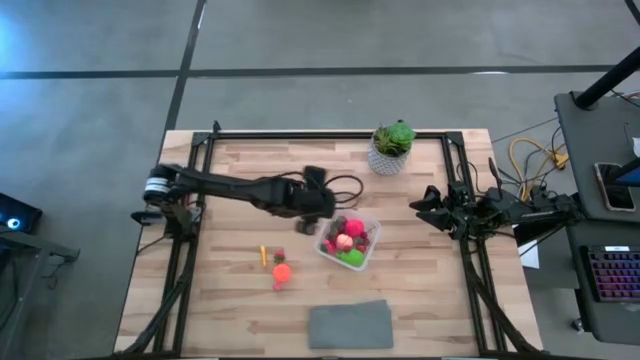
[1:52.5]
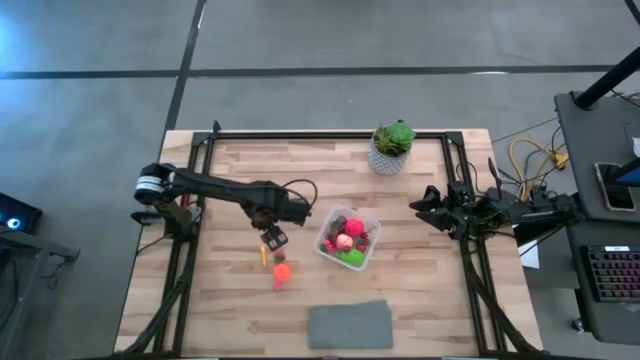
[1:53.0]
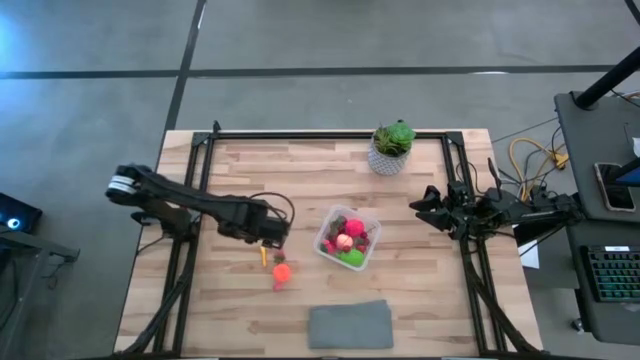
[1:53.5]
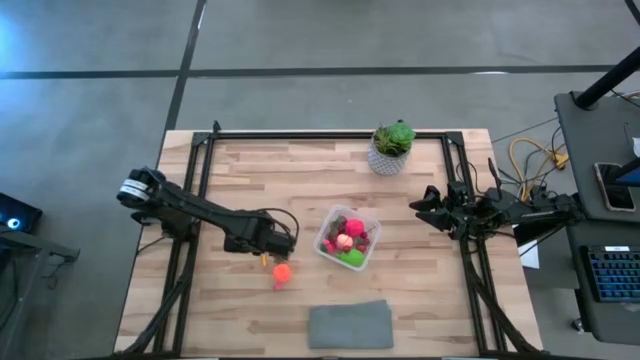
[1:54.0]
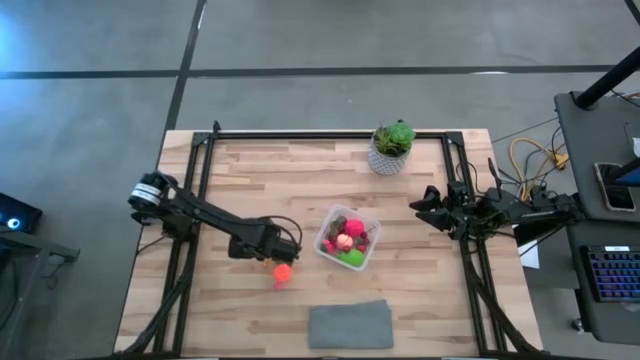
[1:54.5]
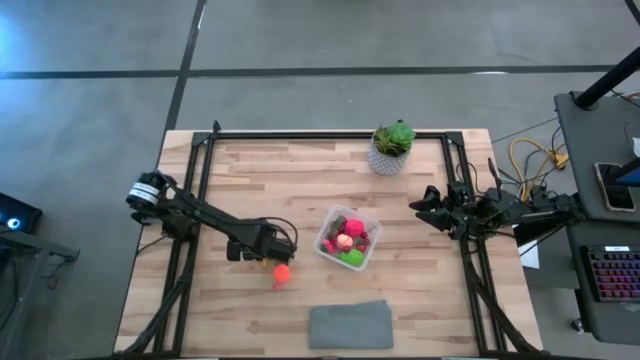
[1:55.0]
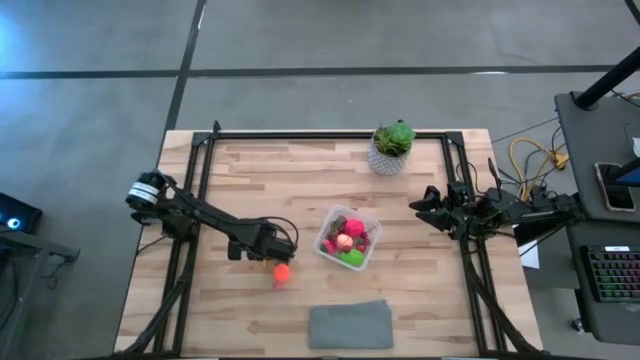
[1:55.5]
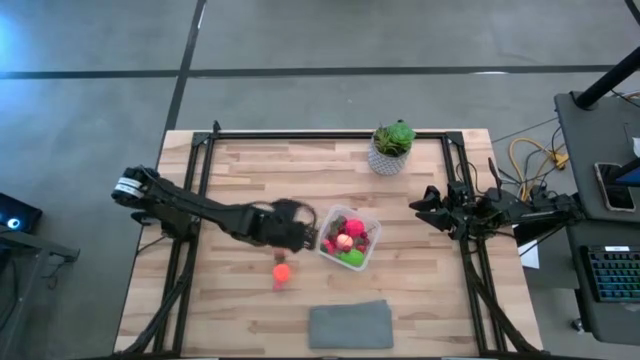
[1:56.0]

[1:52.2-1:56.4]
Task: Pick and placing Produce into tupperware
Put the yellow corn into the transparent container

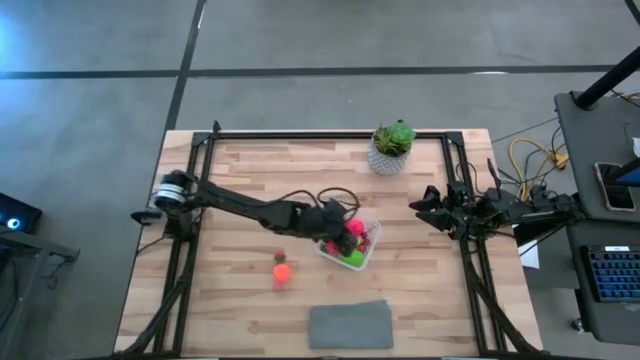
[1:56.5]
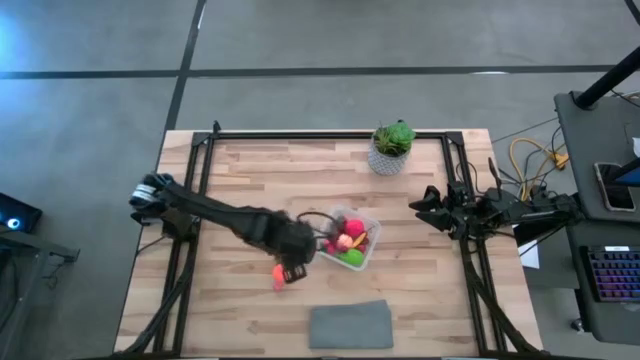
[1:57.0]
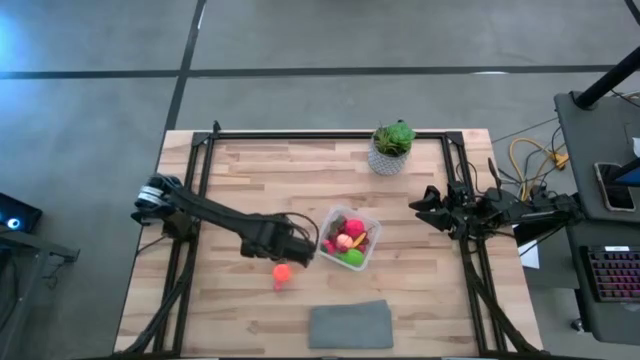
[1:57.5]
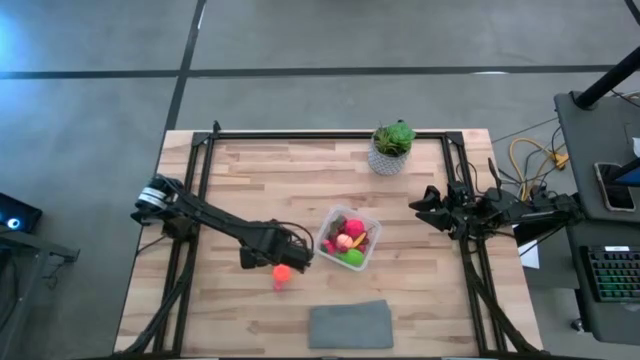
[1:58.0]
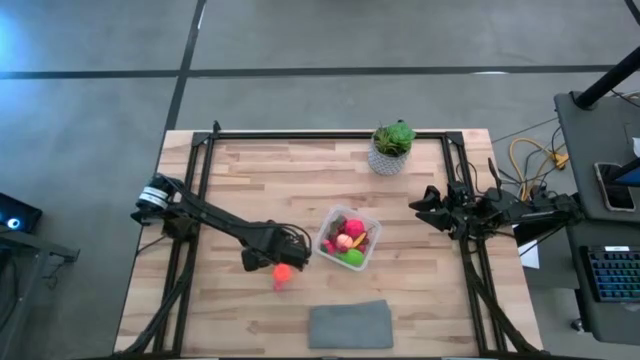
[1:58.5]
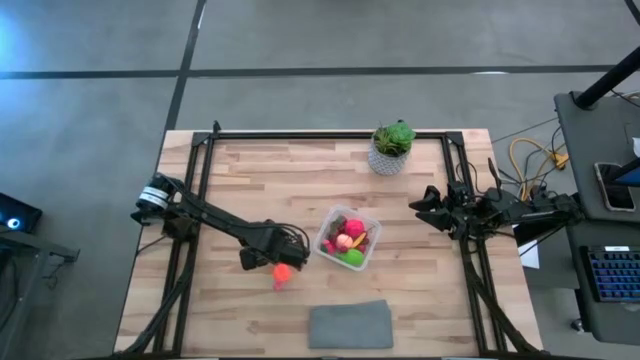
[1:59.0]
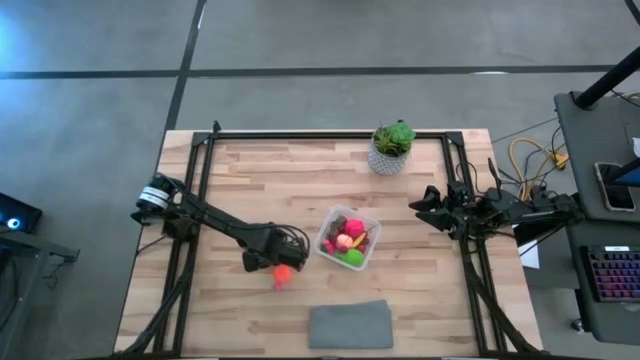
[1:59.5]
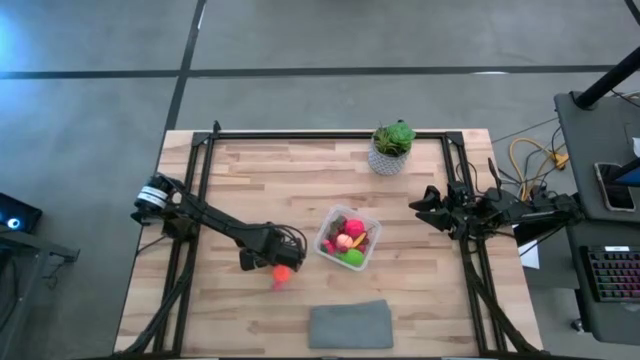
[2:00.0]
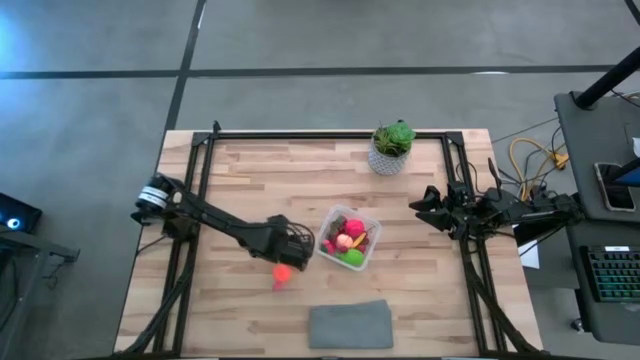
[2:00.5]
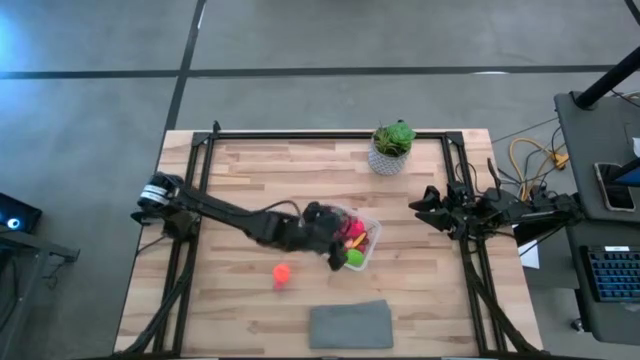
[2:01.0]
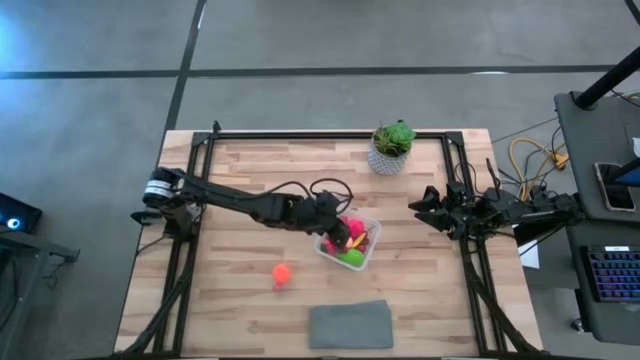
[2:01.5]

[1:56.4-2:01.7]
Put the red strawberry into the transparent container

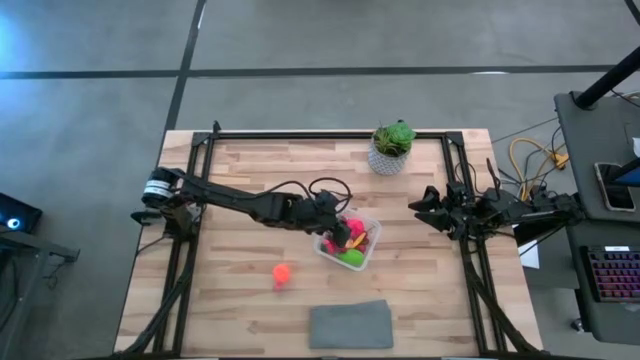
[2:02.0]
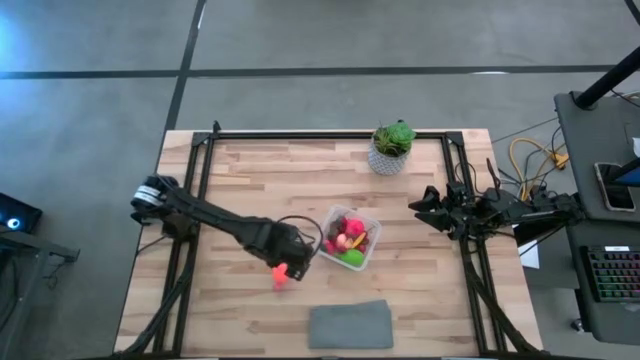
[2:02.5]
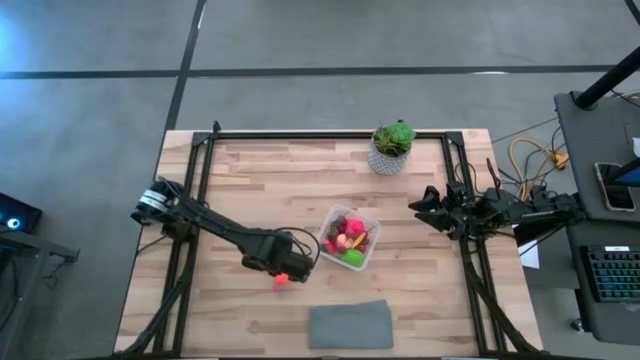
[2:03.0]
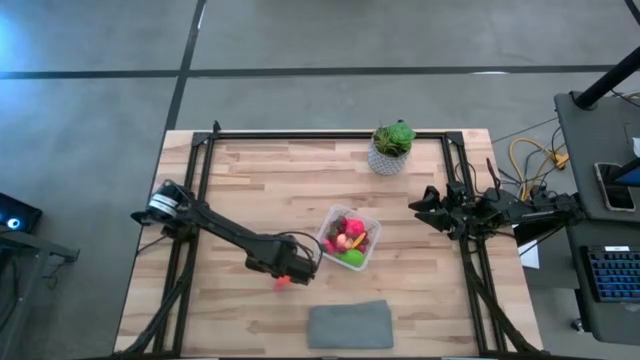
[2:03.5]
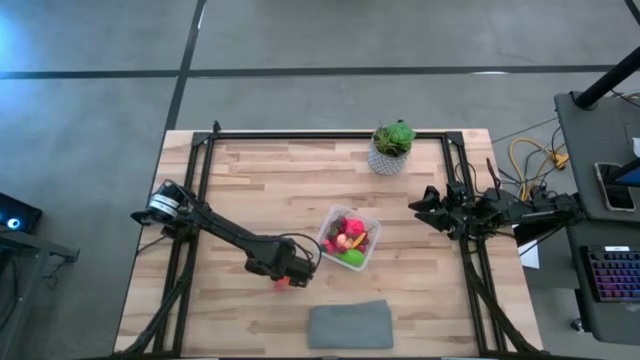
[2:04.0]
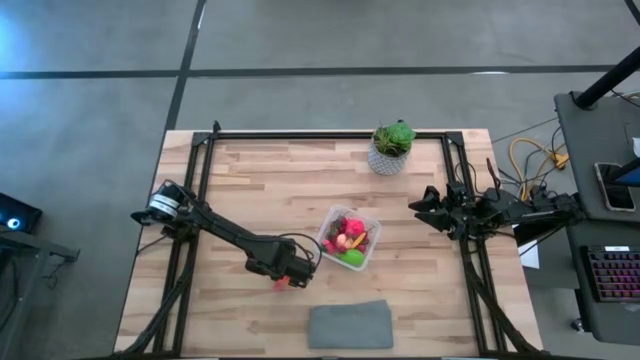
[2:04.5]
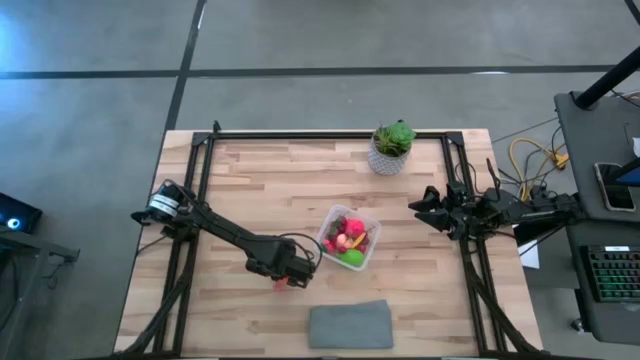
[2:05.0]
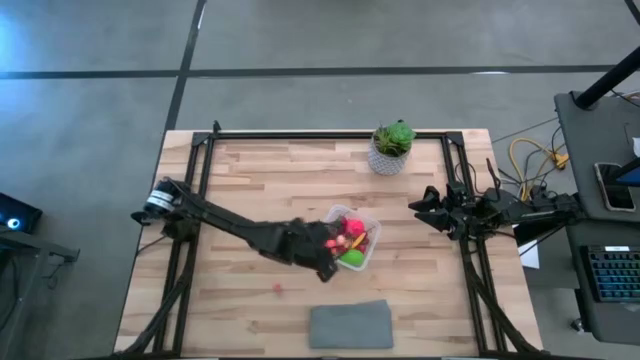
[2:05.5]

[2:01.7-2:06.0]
Put the orange pumpkin into the transparent container

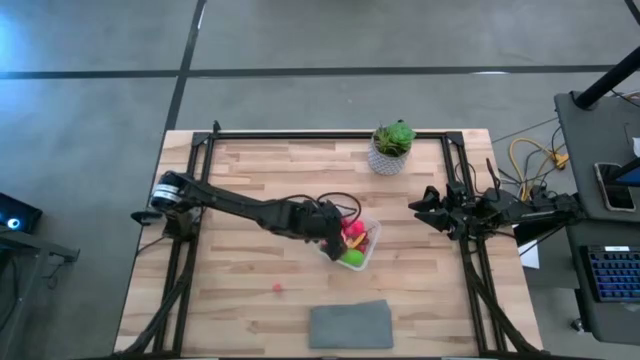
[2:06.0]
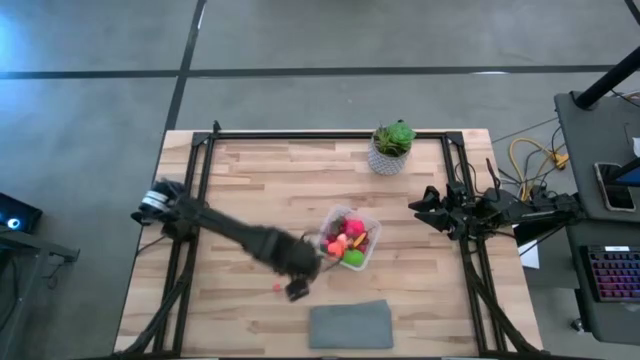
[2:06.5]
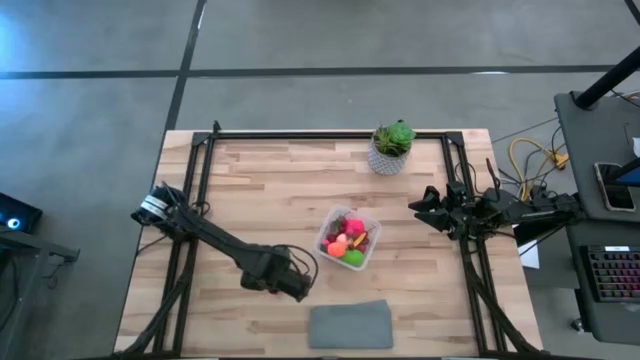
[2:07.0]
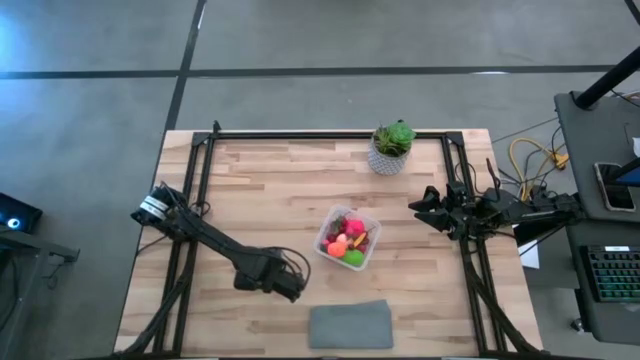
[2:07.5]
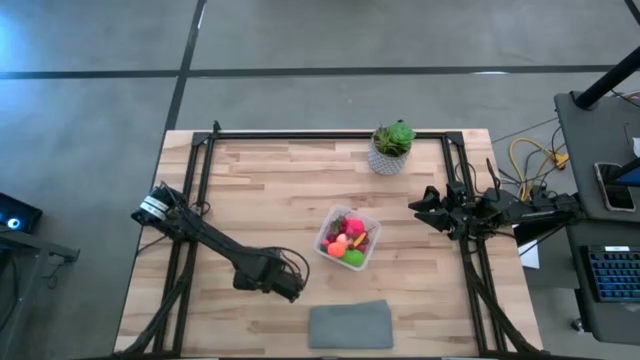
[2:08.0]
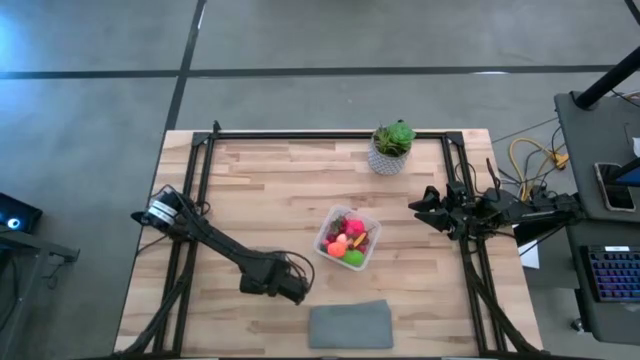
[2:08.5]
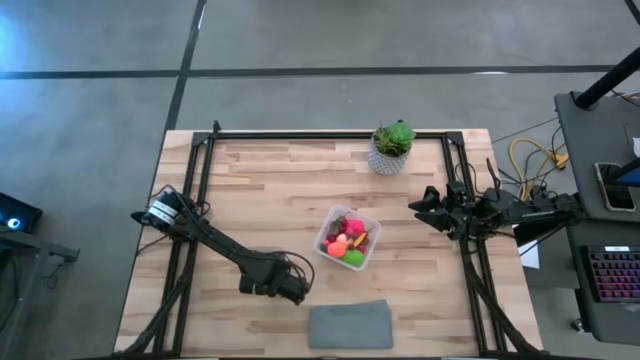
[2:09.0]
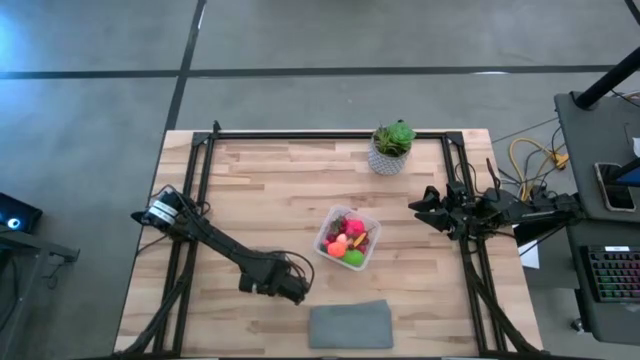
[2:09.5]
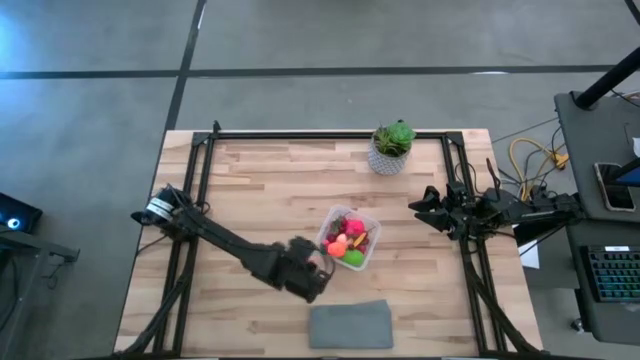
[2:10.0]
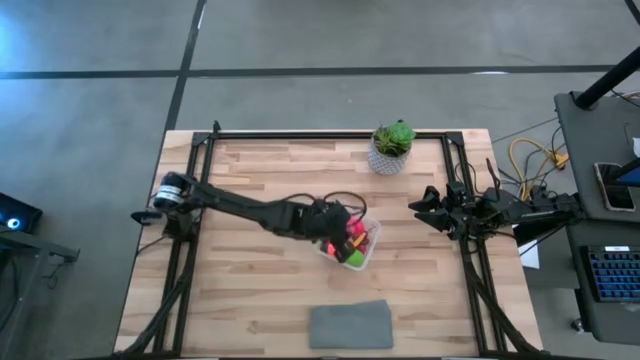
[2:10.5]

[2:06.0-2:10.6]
Put the peach into the transparent container

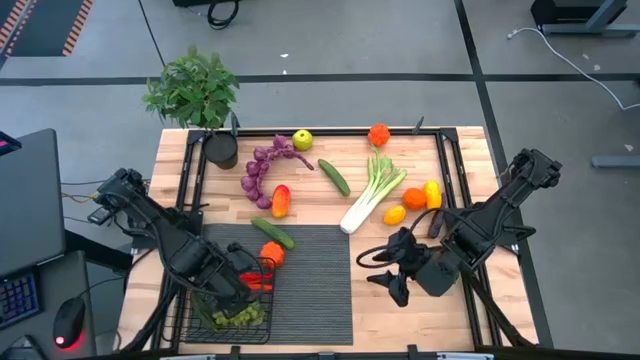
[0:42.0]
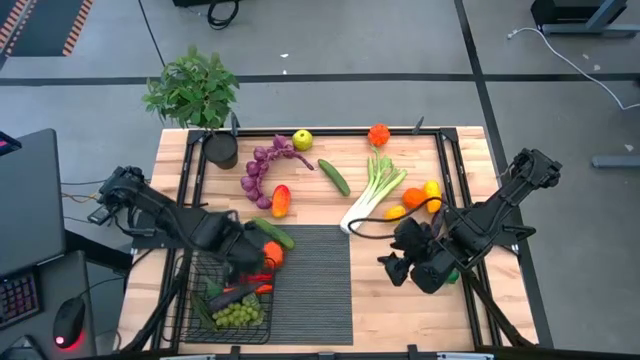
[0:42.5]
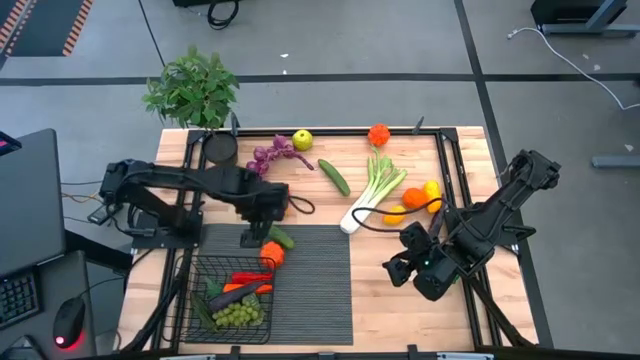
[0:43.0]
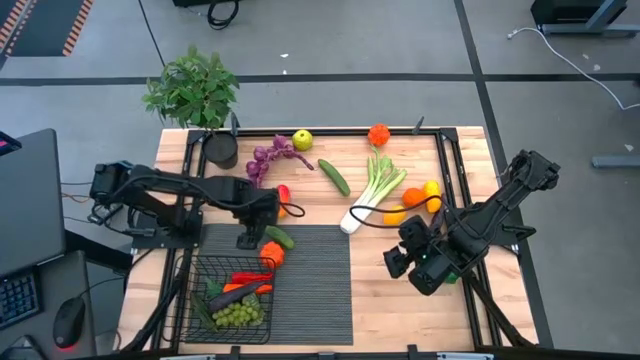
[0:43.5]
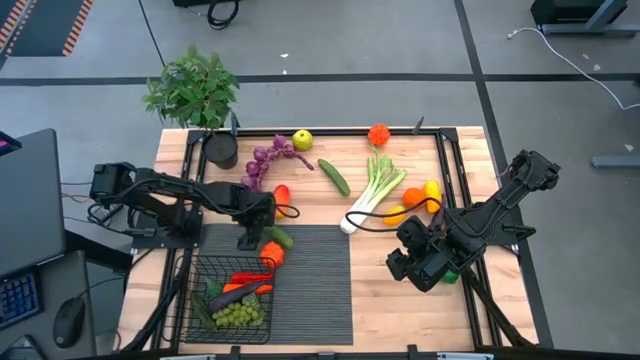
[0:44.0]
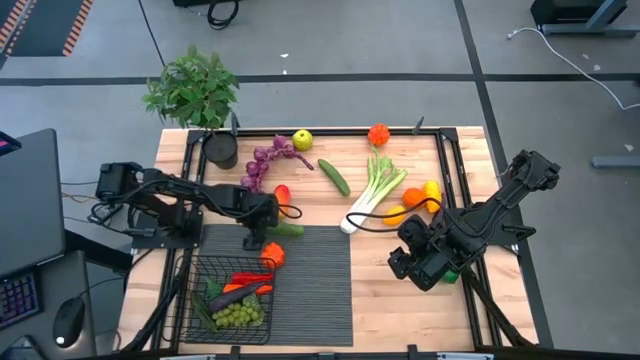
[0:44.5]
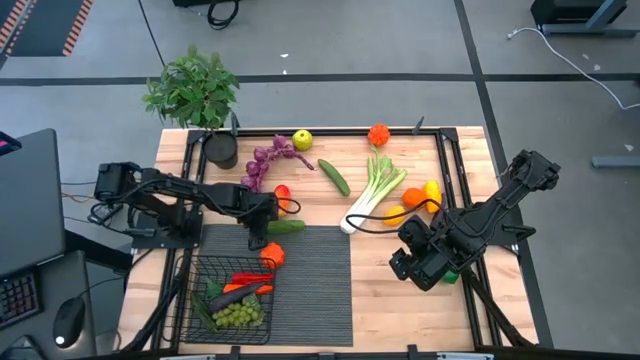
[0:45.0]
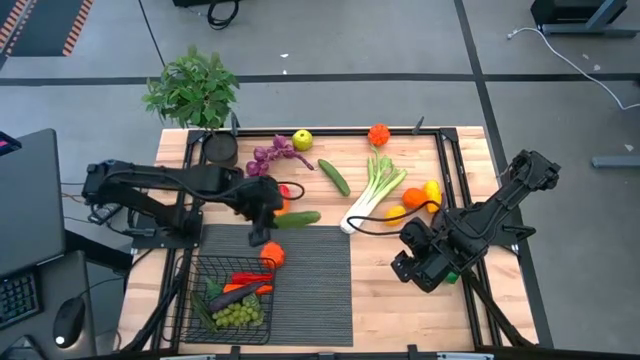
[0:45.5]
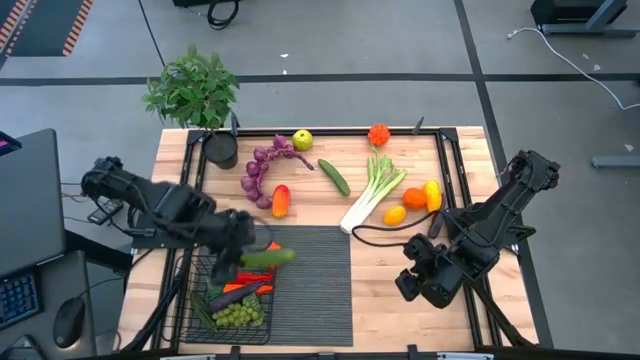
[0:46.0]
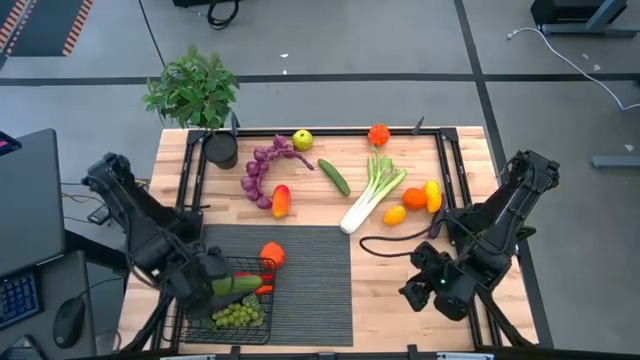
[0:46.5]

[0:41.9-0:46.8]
Task: Build produce basket
Put the bottom green cucumber into the wire basket
